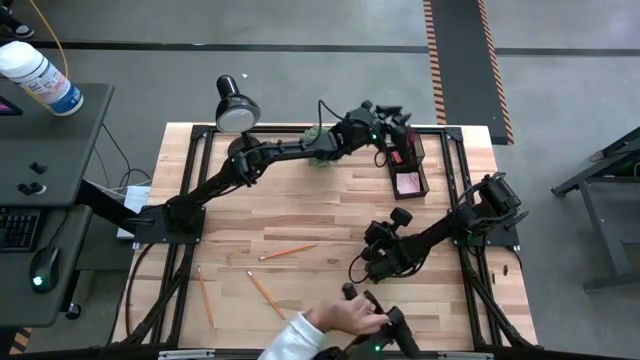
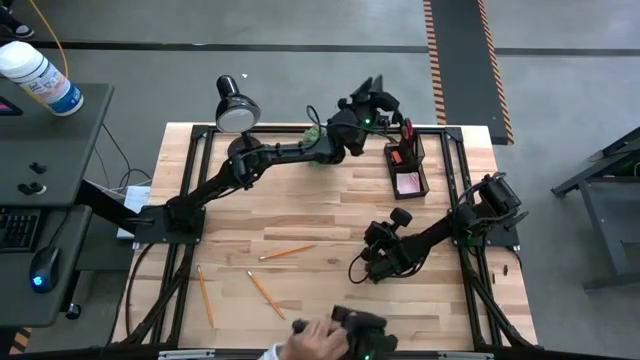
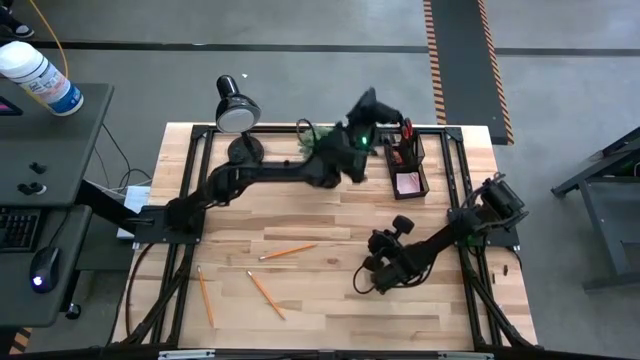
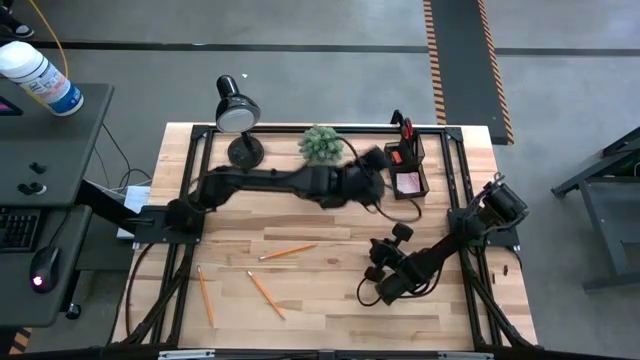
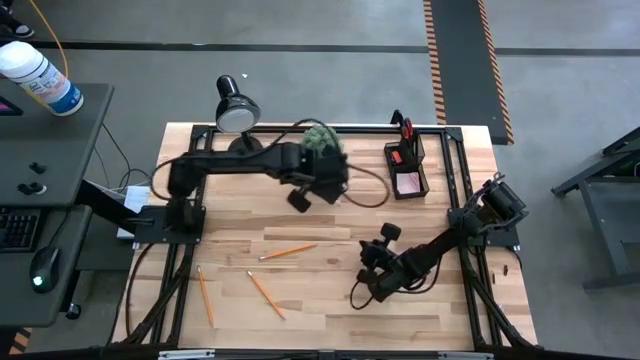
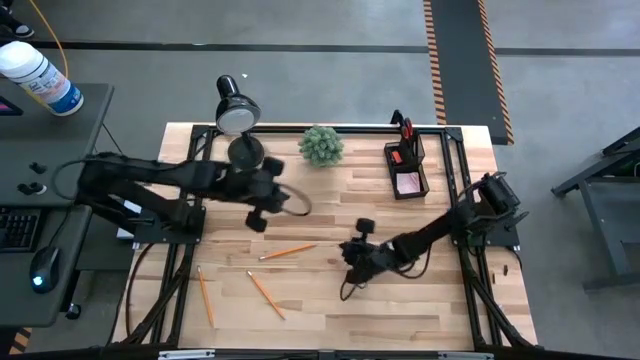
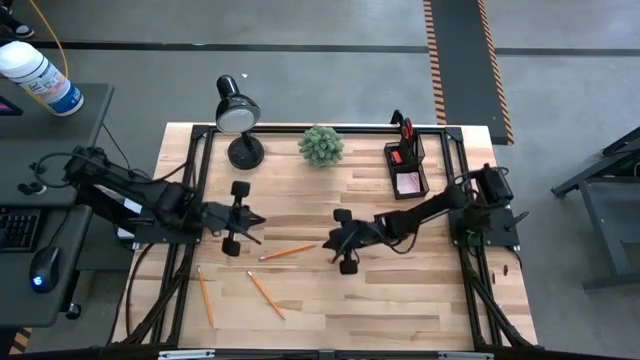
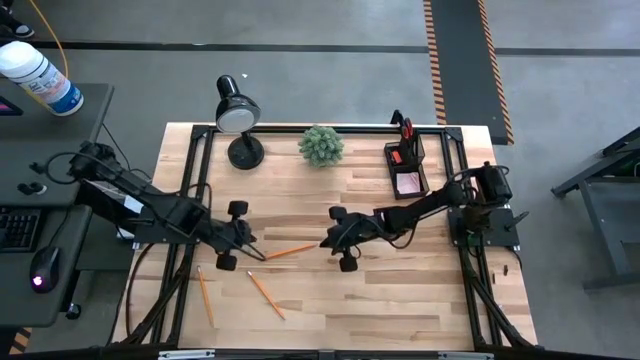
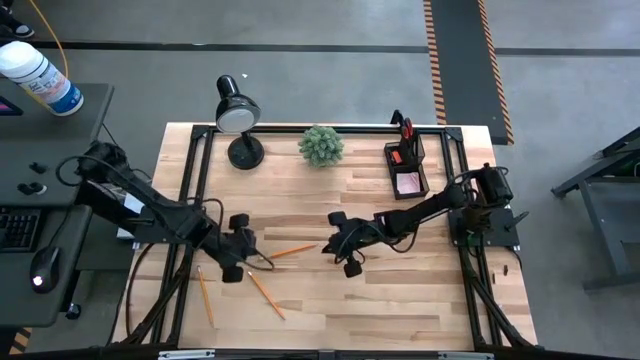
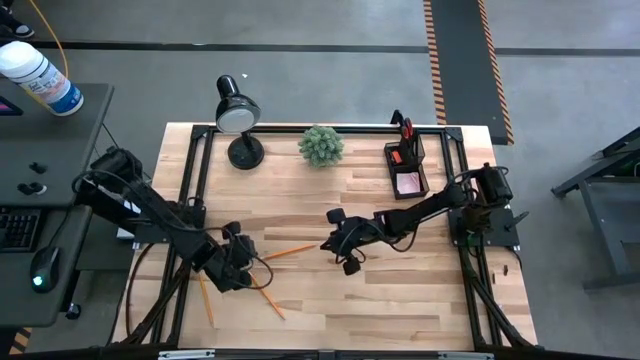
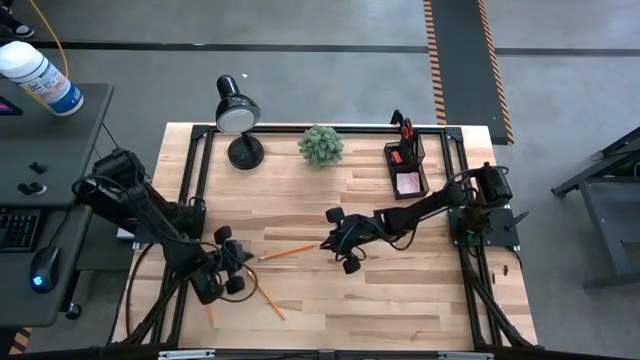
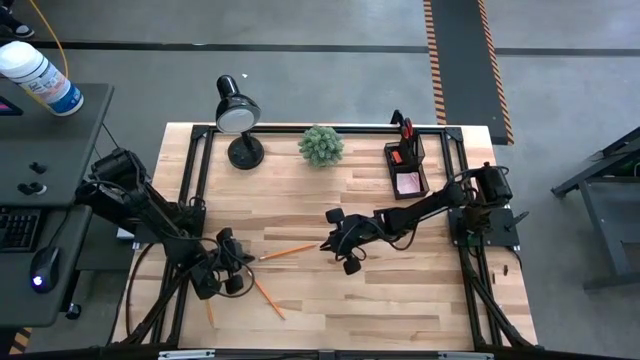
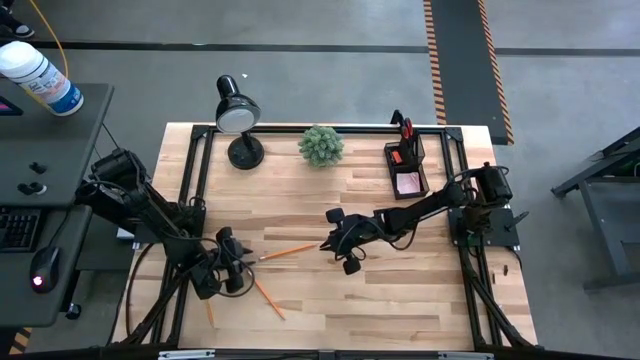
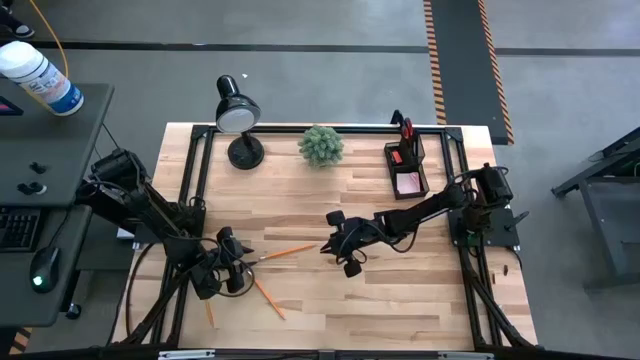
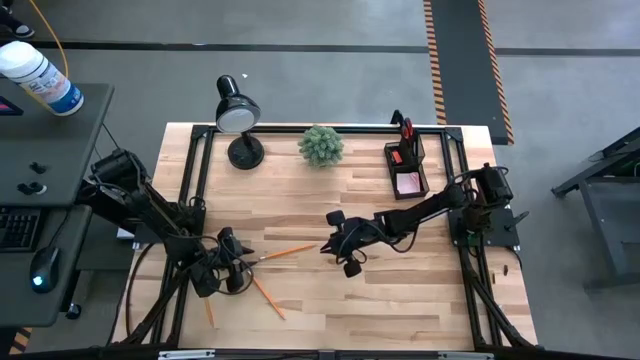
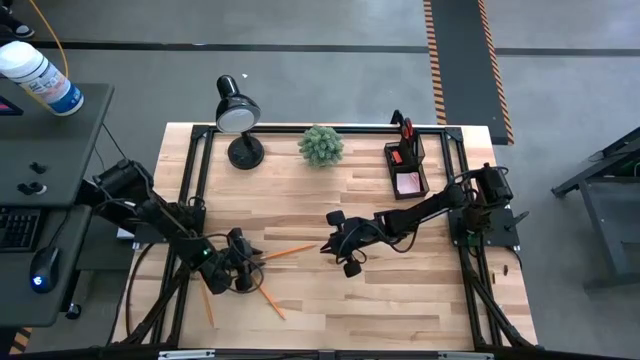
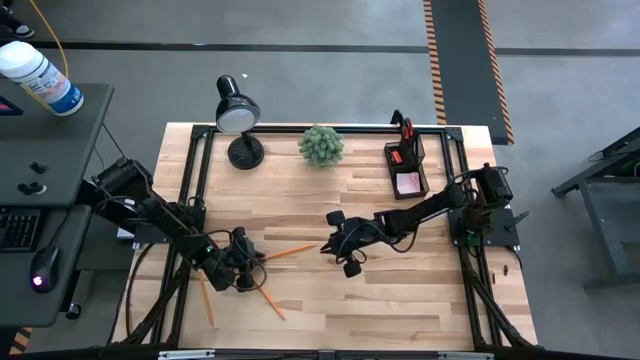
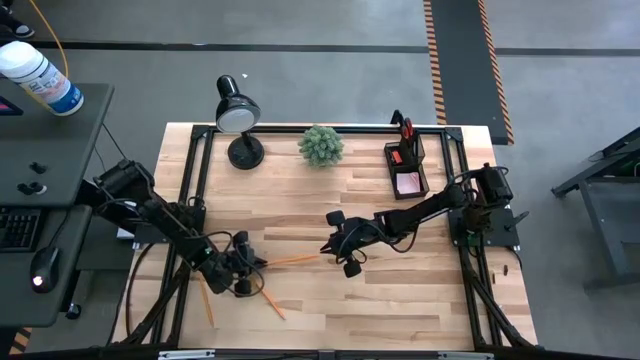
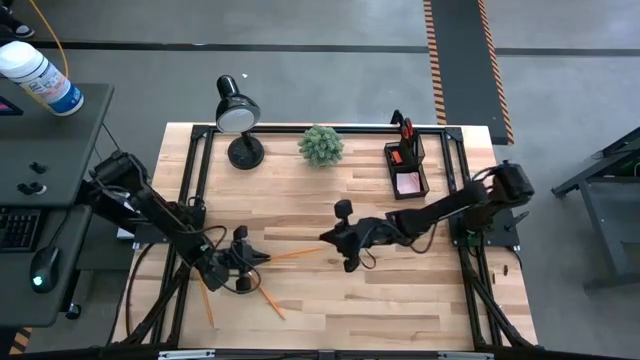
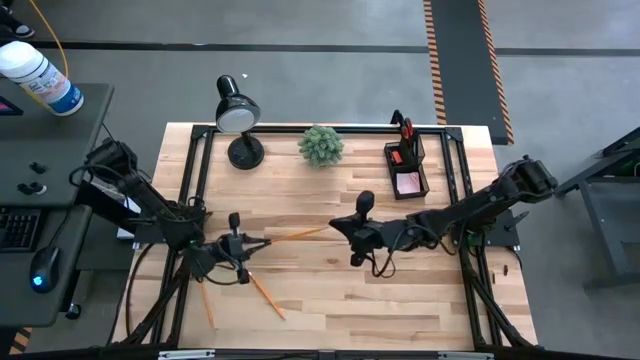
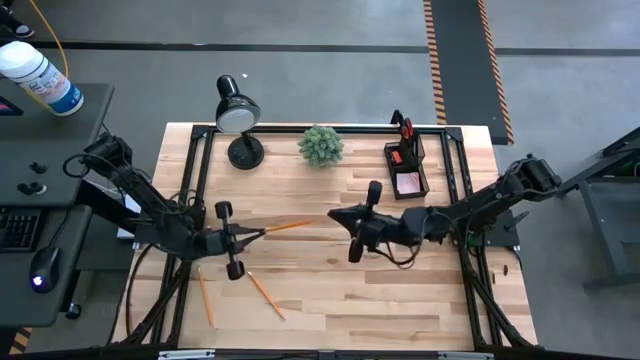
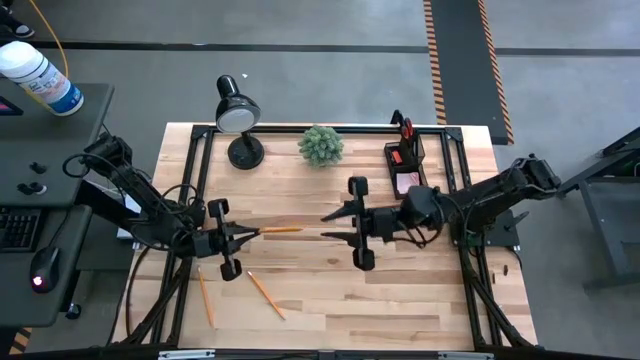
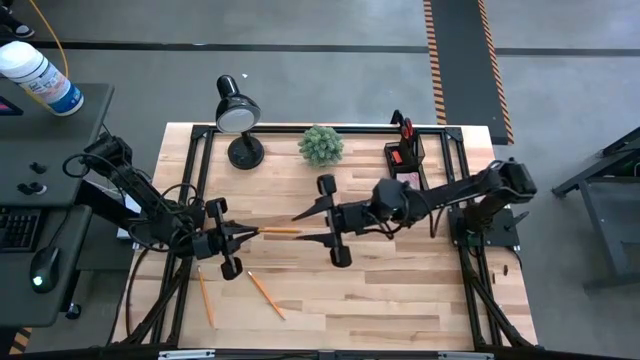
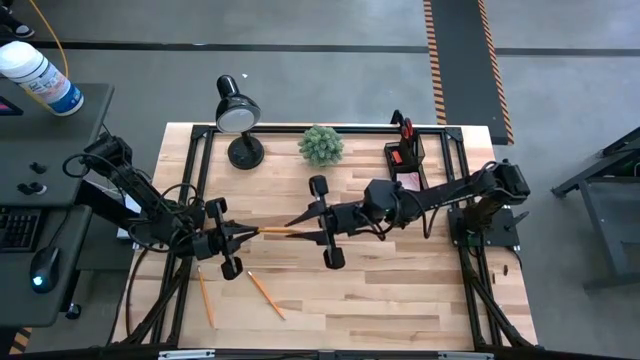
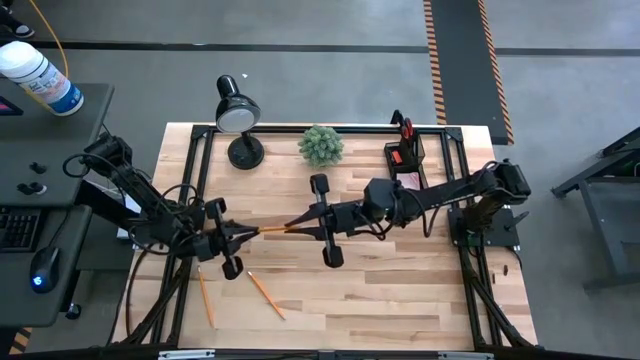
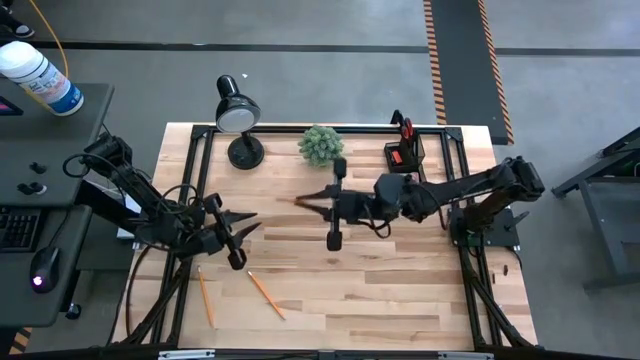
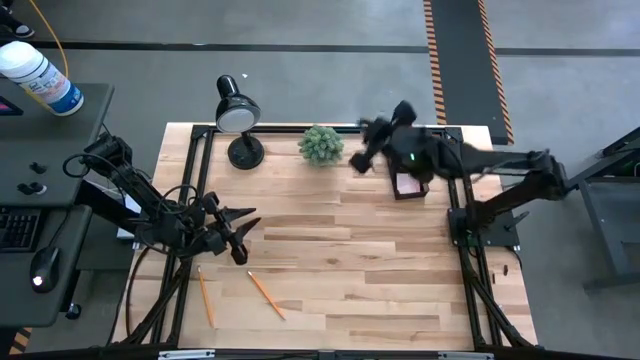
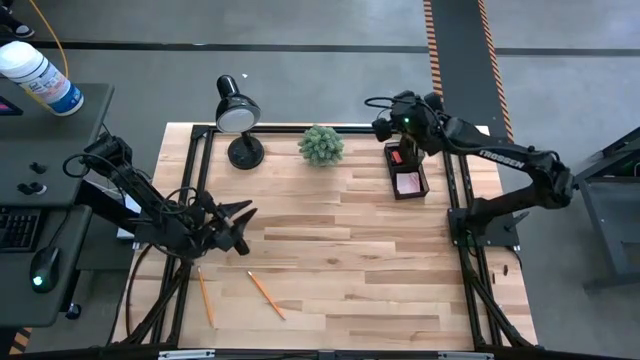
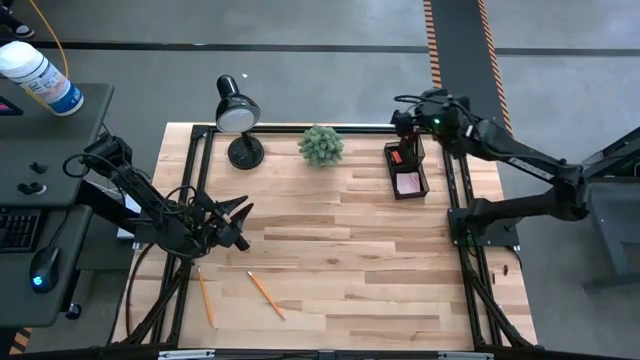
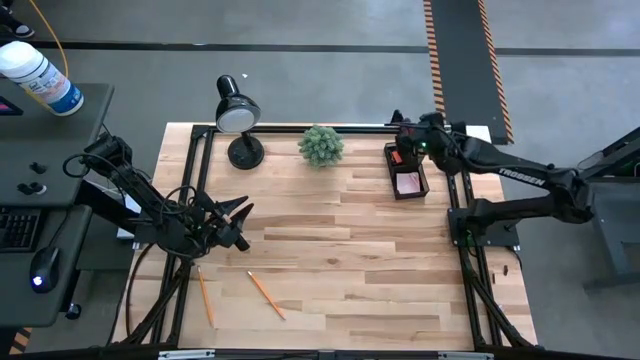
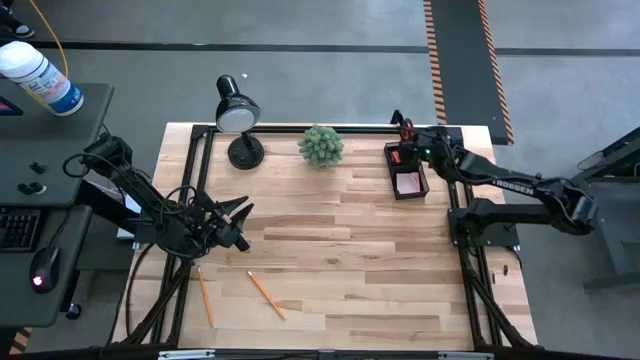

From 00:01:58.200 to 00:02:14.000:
Task: Pick and place office supplies into organizer
Put the right pencil into the desk organizer

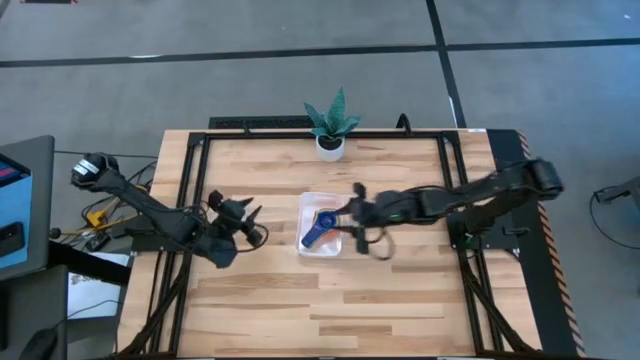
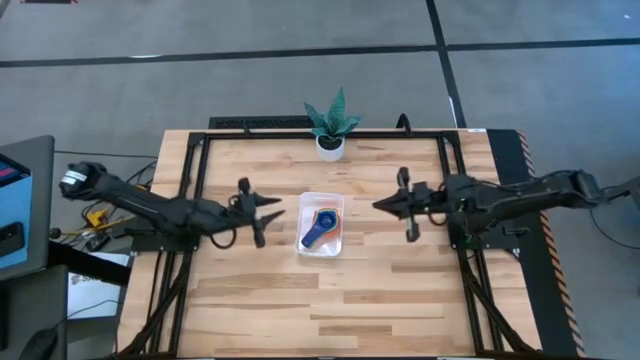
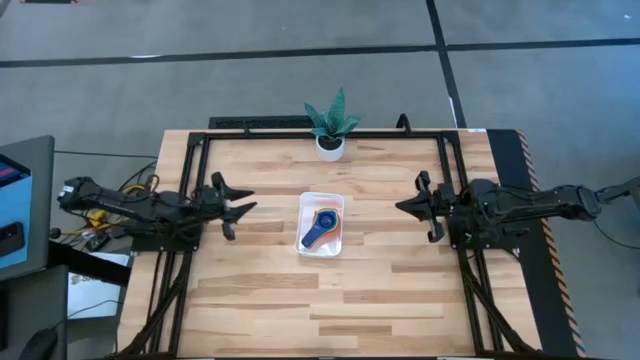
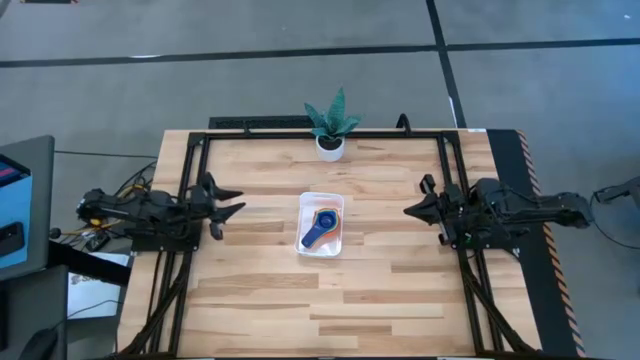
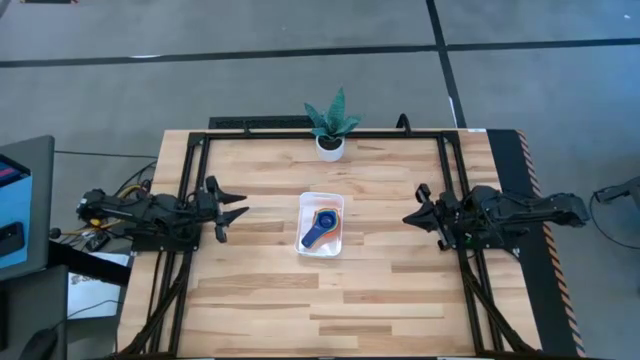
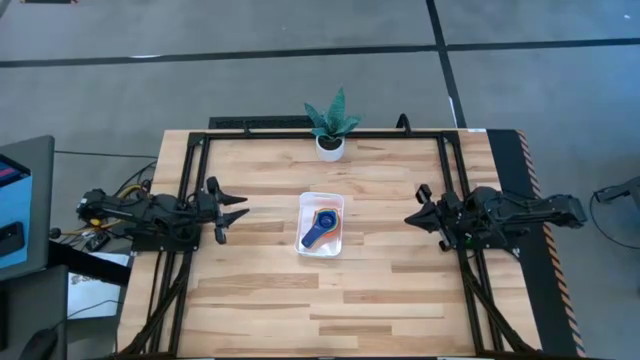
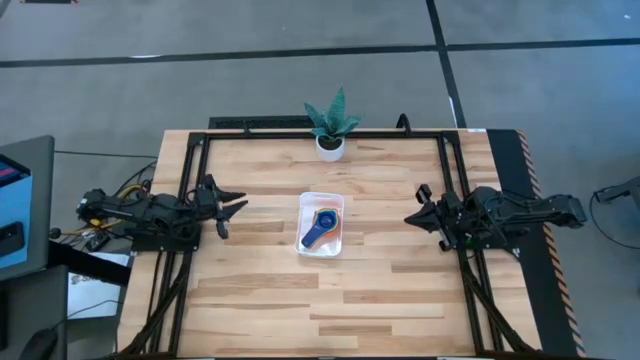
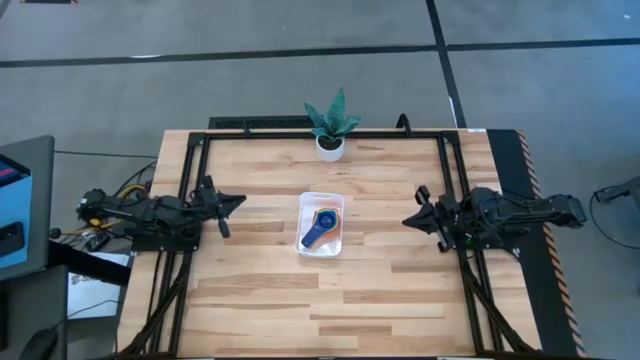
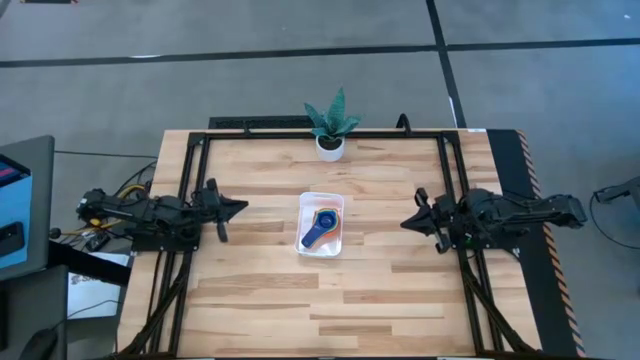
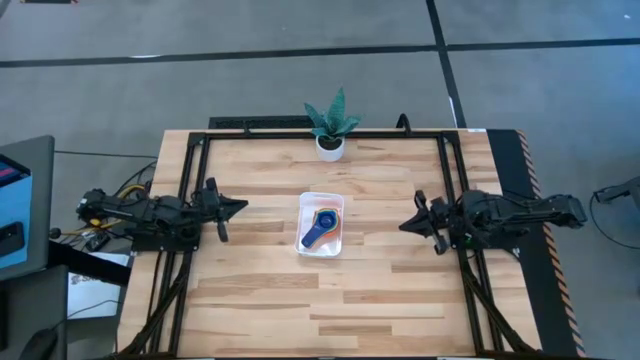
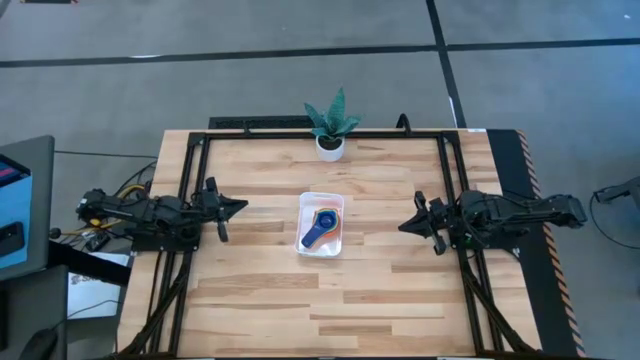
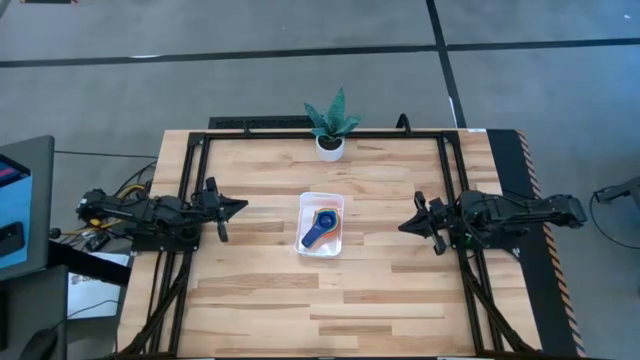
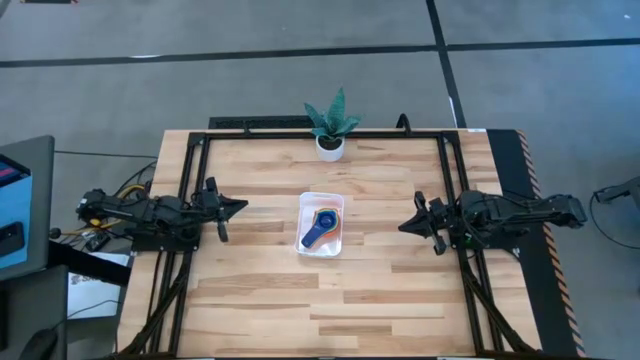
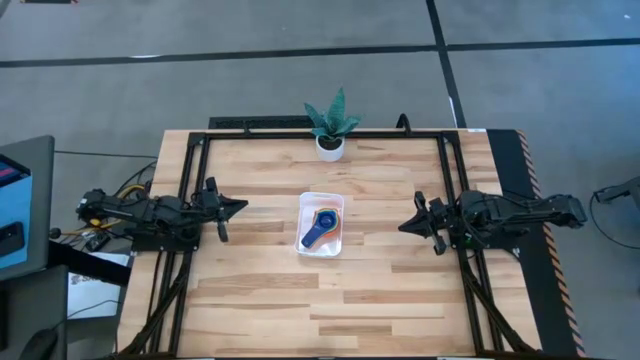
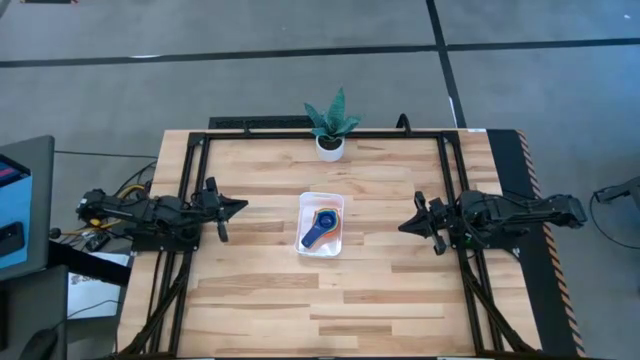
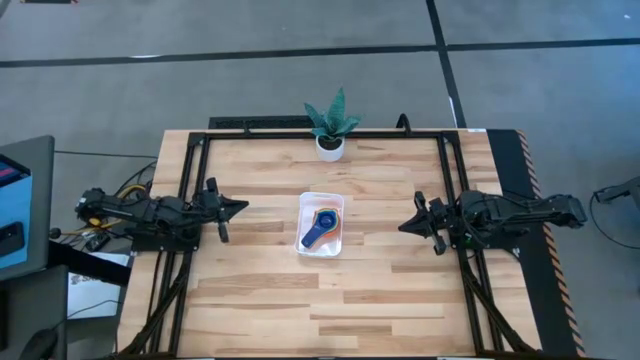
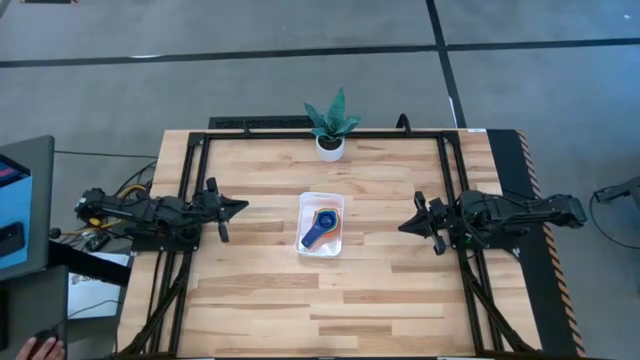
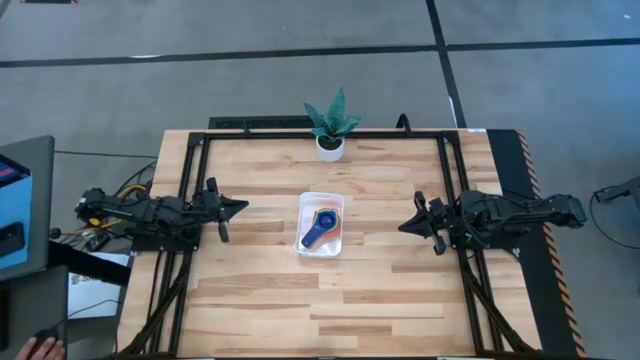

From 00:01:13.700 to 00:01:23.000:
Task: Nest measuring cups in basket
Return to Home Position
